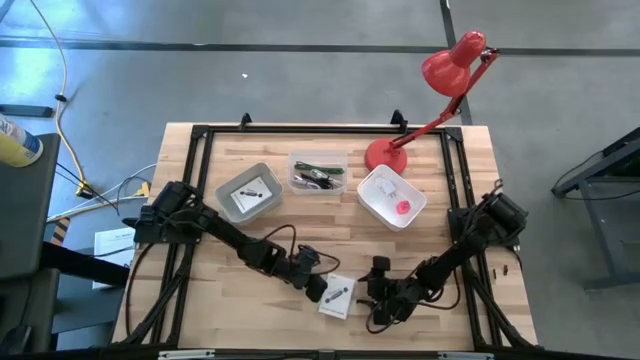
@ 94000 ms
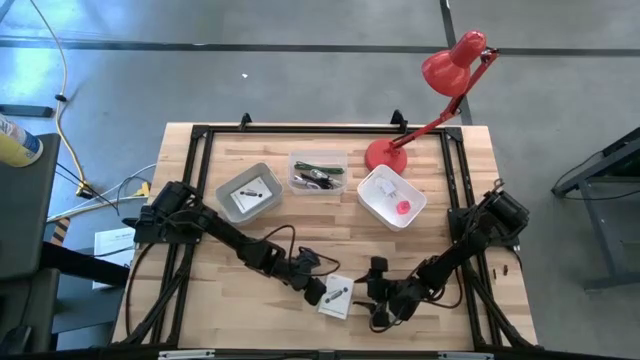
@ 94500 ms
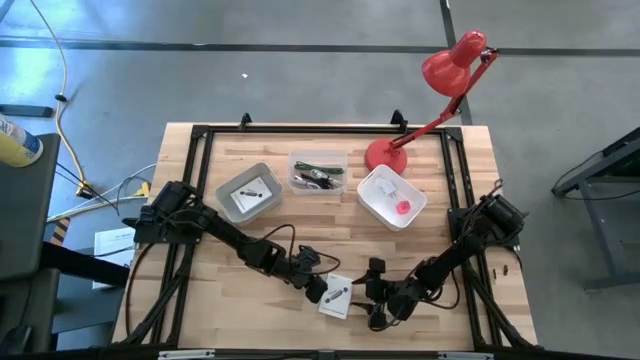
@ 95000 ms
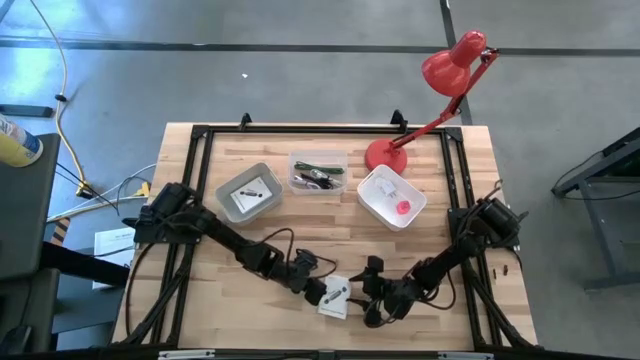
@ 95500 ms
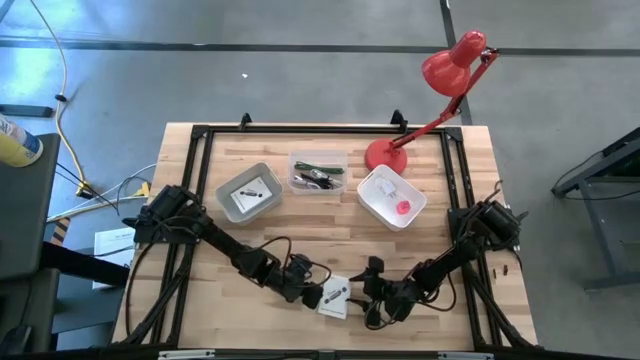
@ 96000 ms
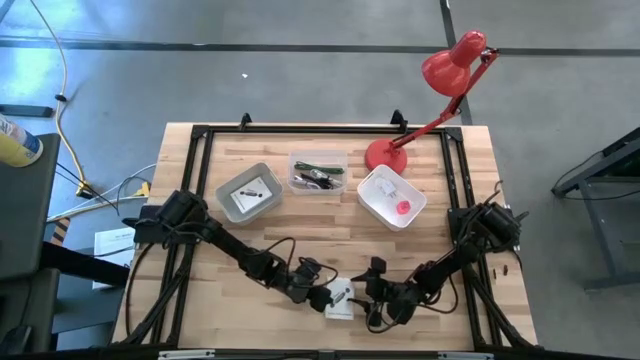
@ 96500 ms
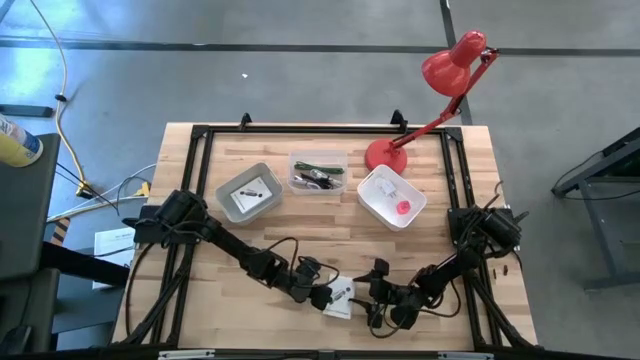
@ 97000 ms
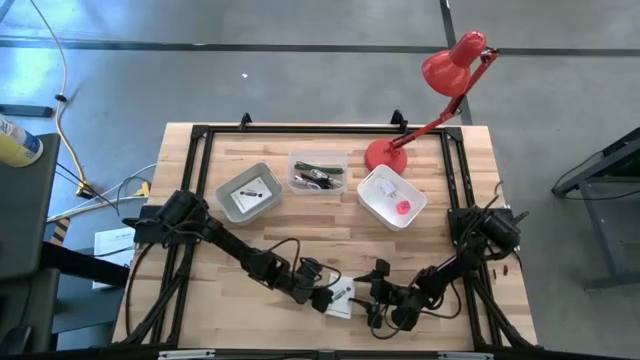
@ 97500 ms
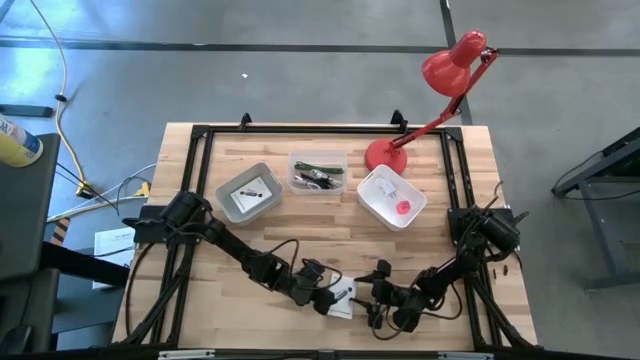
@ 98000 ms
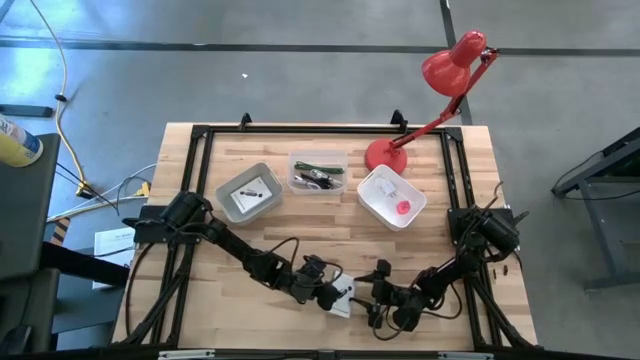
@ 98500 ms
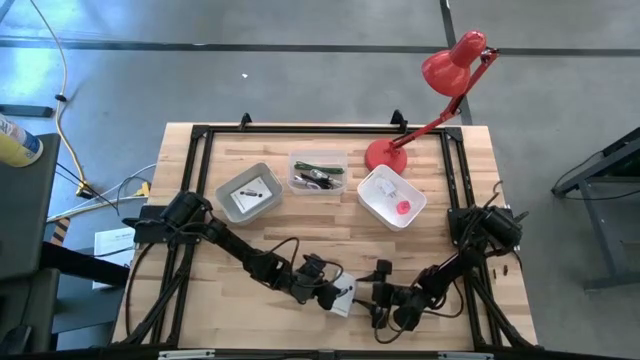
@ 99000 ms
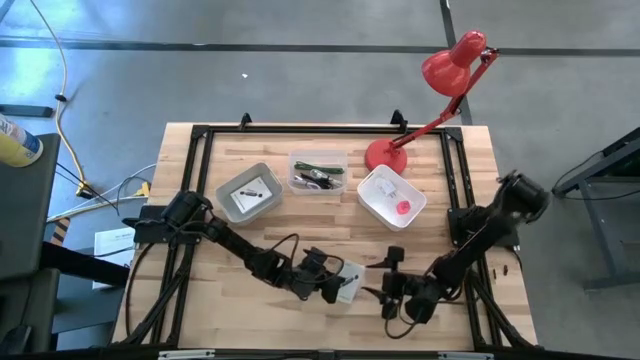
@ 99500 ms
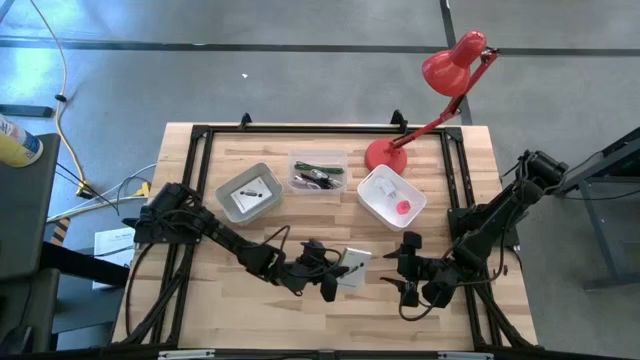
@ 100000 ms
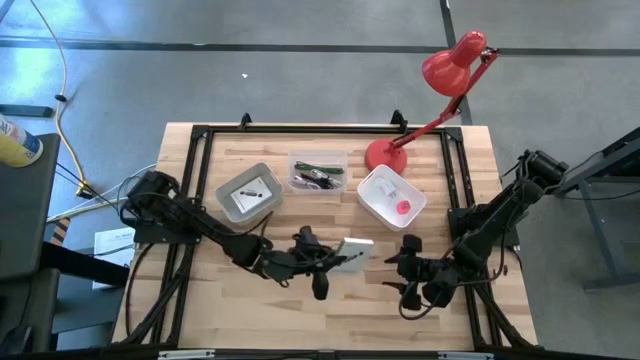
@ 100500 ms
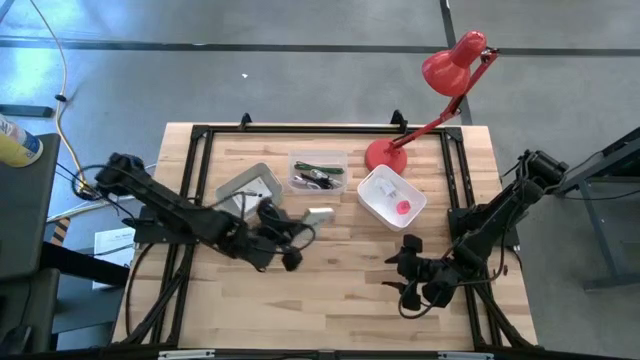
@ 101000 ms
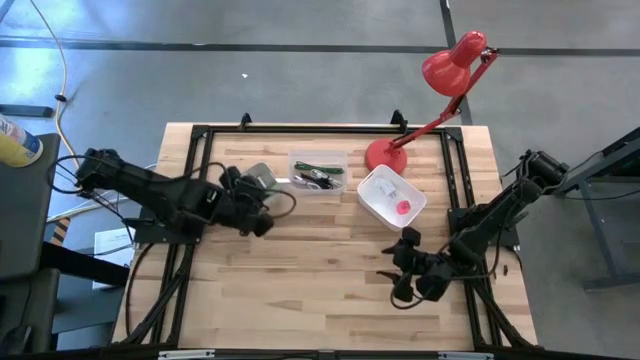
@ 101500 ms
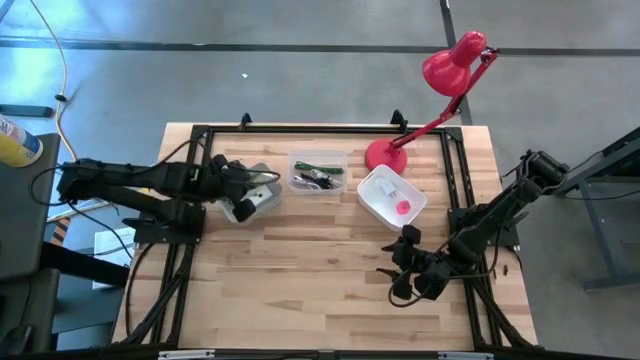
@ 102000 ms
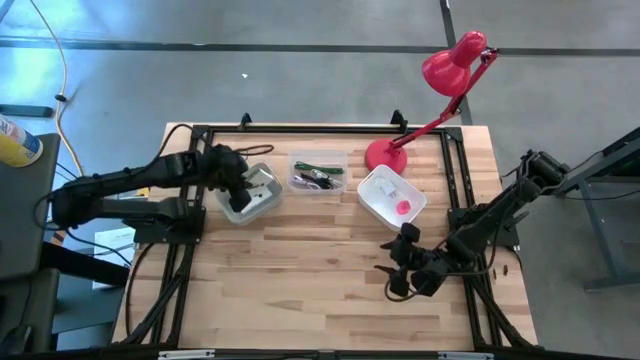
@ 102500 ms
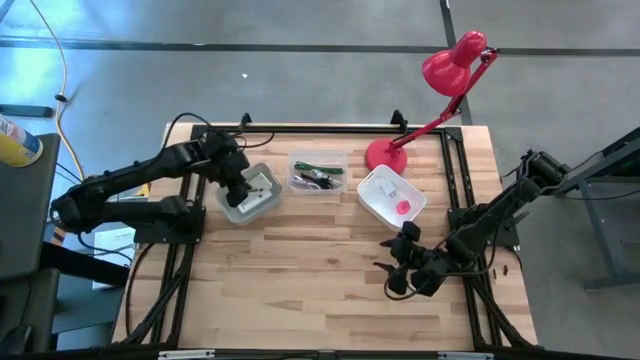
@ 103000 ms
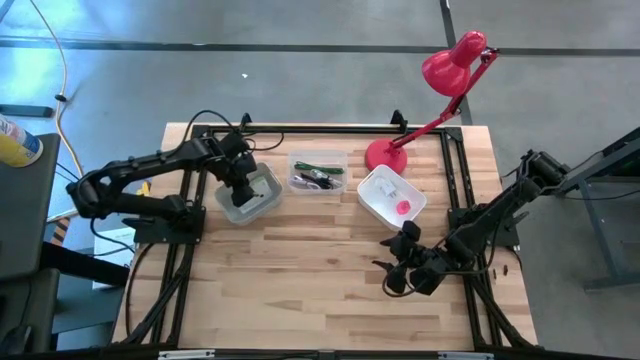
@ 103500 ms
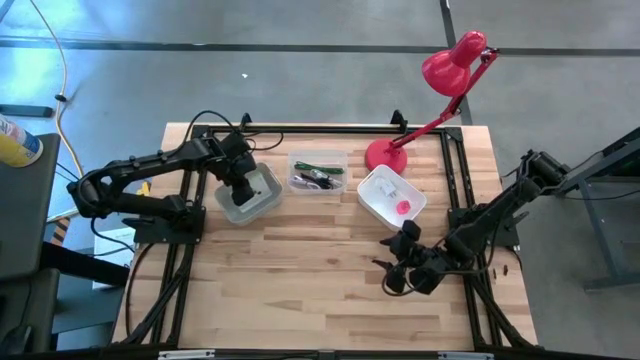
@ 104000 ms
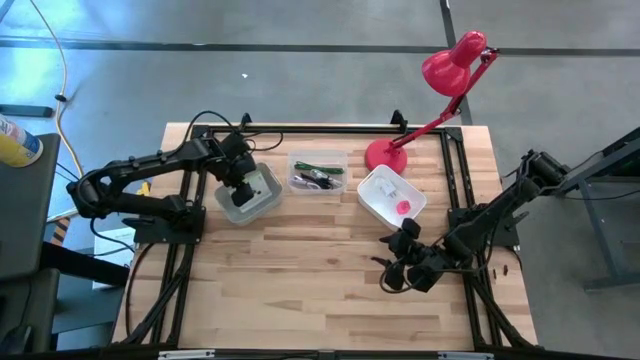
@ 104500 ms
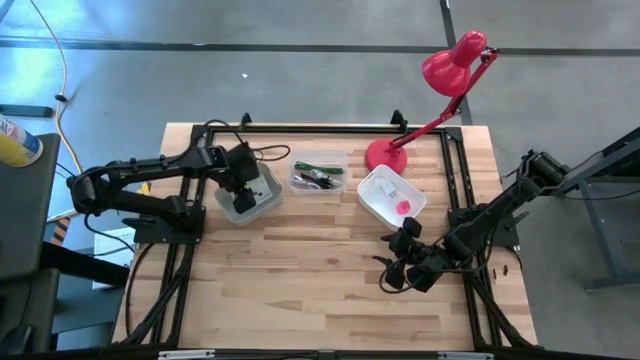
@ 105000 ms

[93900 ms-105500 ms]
Task: Pick and place items into bin
Put the card reader box into the gray bin

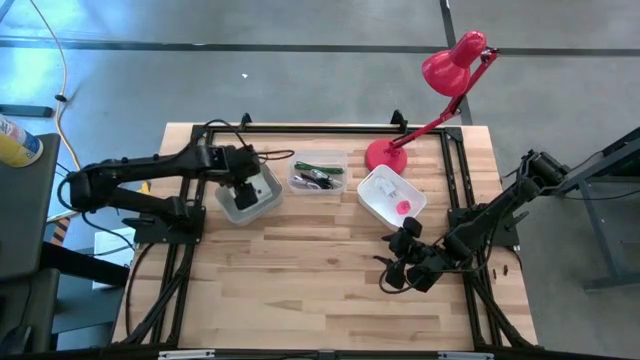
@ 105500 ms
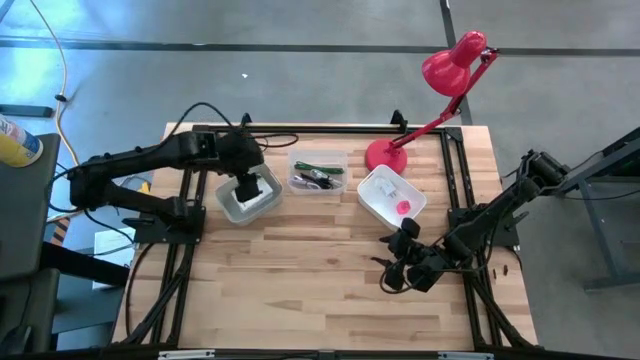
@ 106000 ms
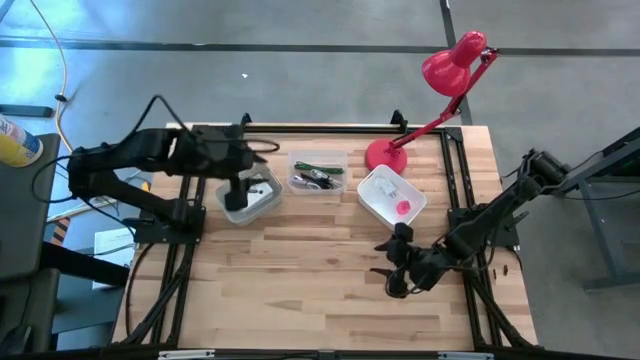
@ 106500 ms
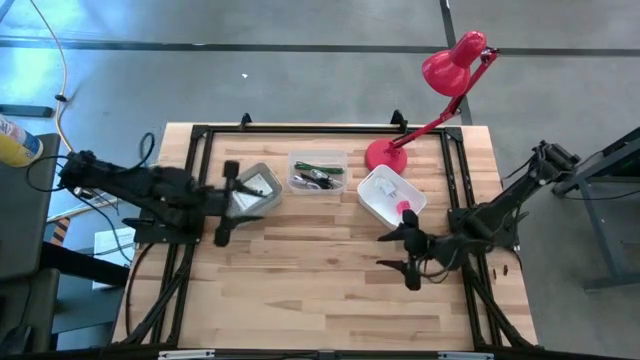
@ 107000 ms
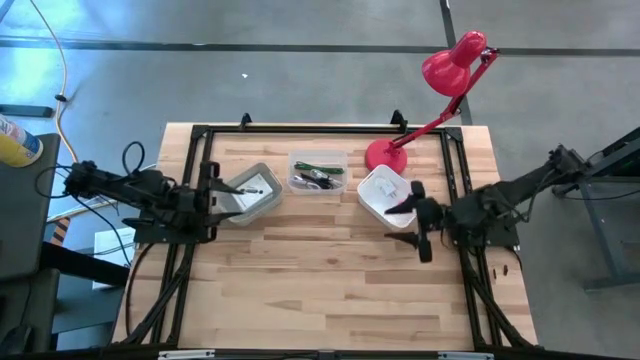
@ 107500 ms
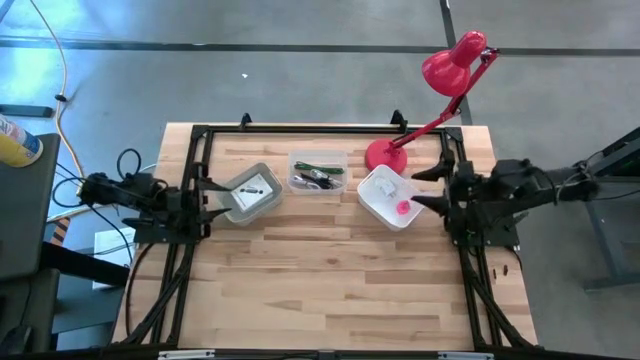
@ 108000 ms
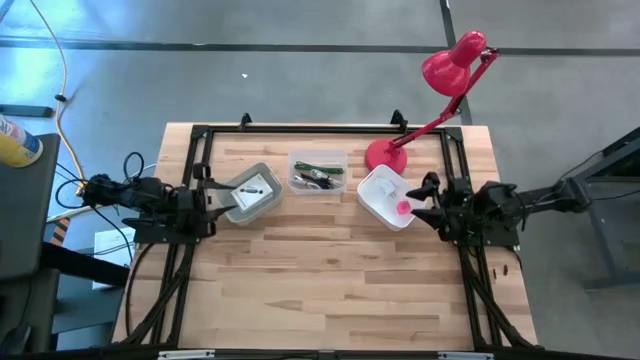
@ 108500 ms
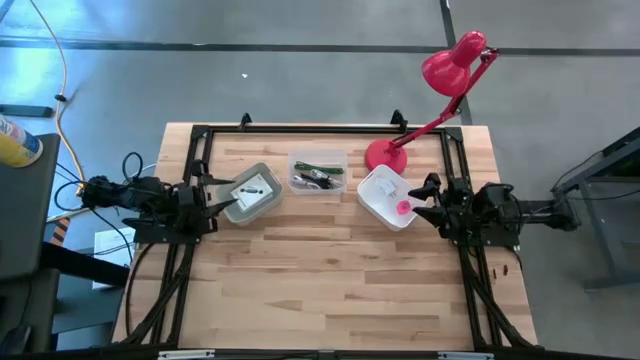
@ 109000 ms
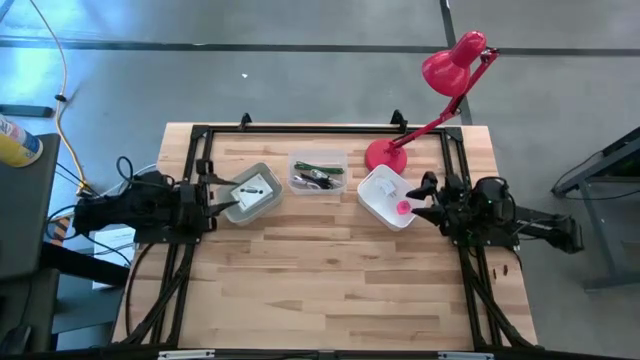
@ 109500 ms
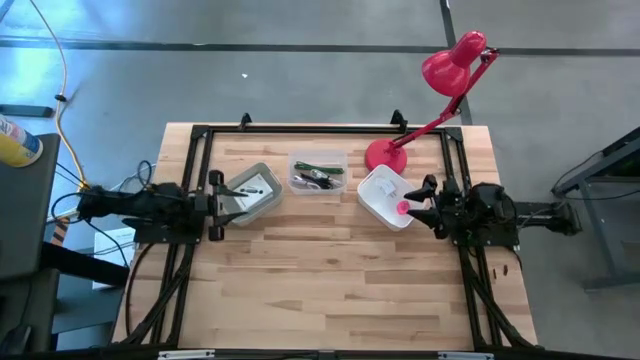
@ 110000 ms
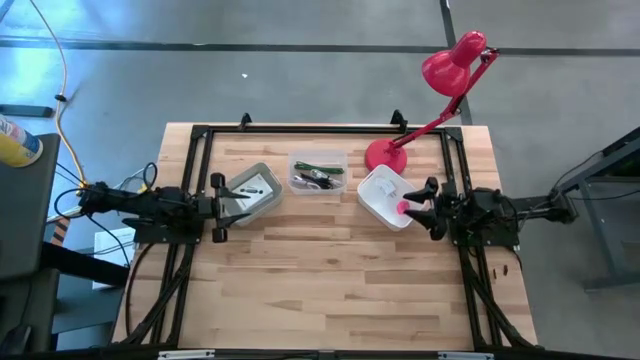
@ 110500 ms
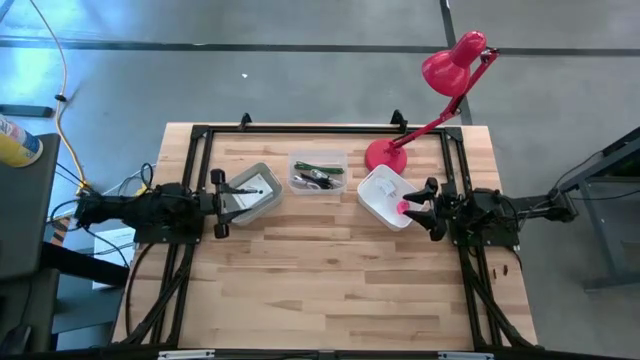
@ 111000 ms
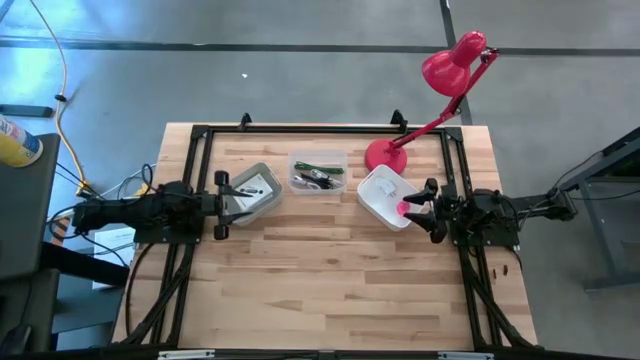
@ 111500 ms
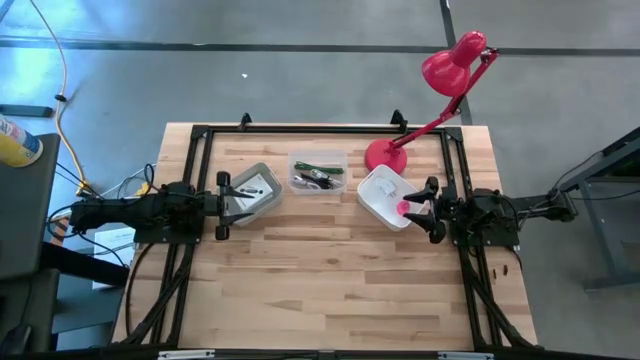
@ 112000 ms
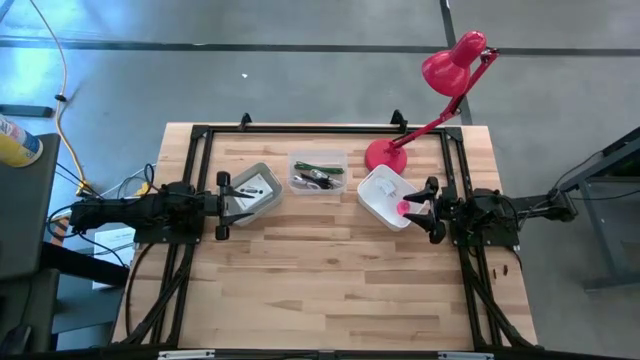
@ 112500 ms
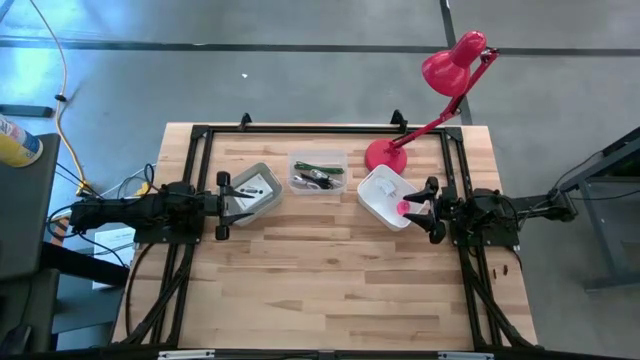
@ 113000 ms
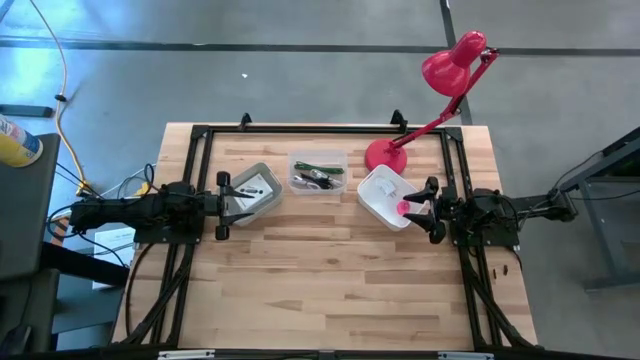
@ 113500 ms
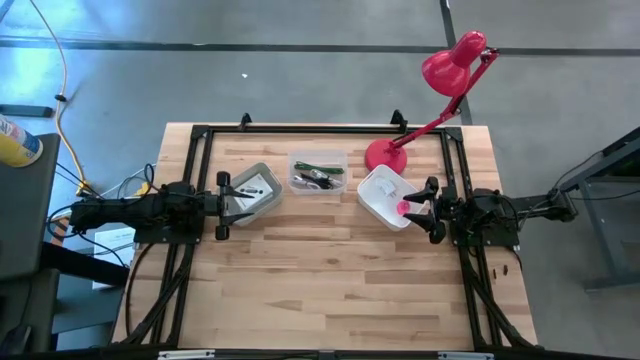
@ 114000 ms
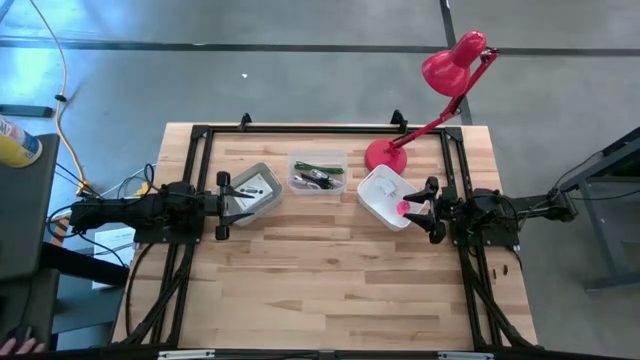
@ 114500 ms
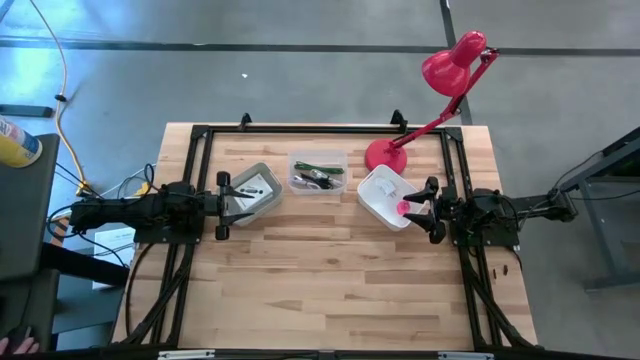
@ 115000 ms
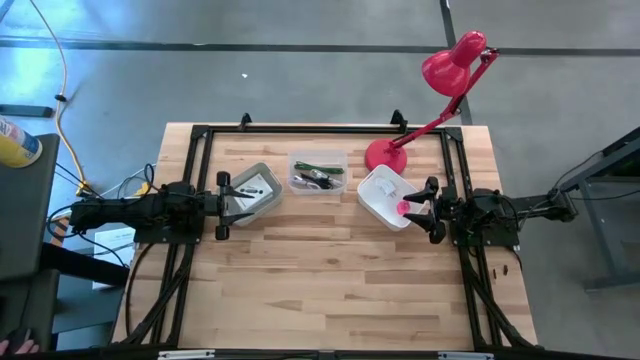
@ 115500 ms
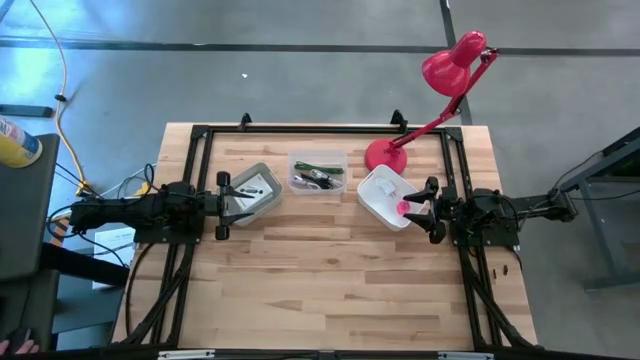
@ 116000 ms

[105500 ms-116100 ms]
Return to Home Position

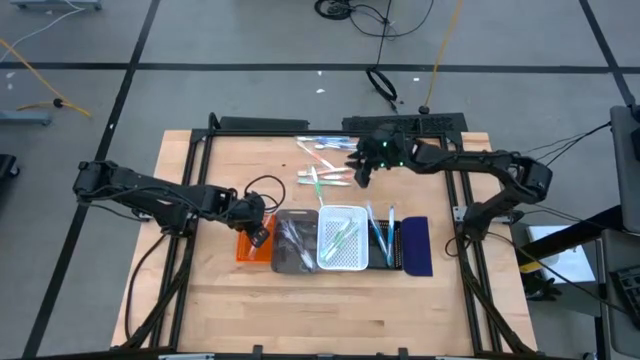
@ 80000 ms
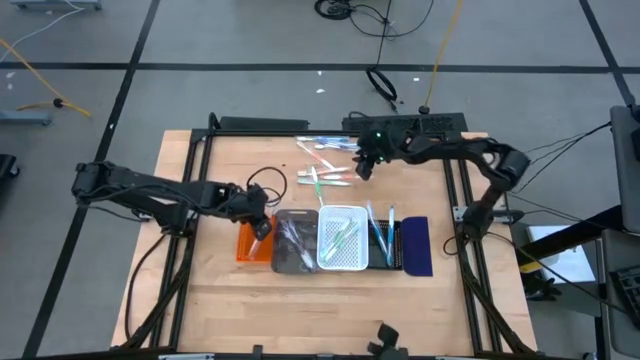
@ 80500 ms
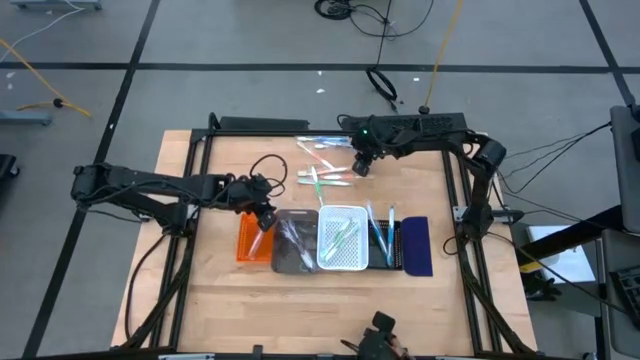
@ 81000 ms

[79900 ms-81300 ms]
Task: Pick & Place Toothbrushes
Put the purple toothbrush into the left black bin
